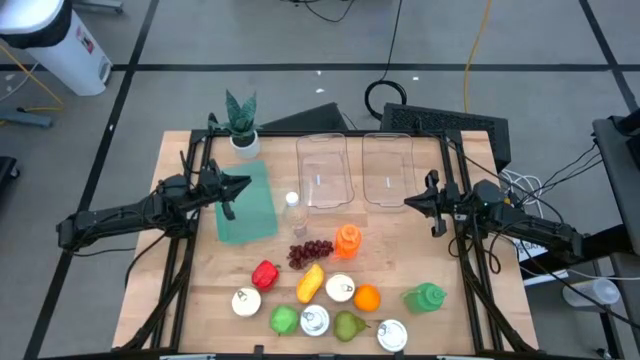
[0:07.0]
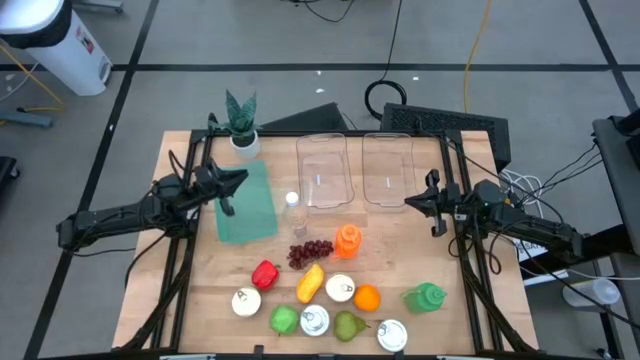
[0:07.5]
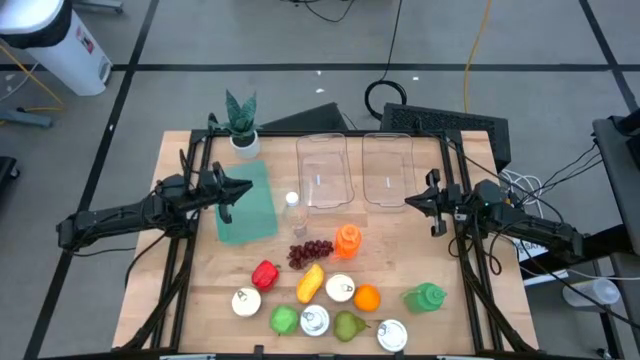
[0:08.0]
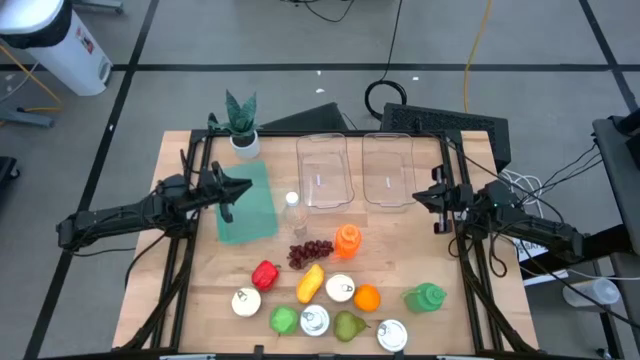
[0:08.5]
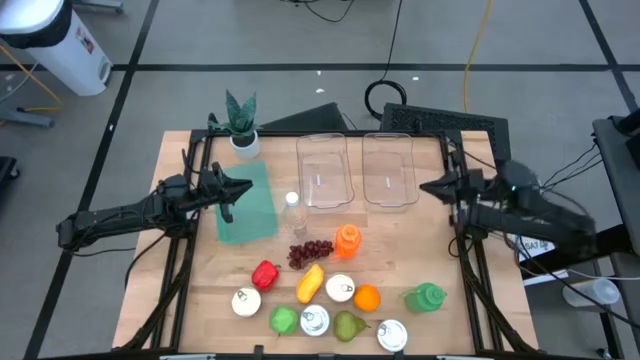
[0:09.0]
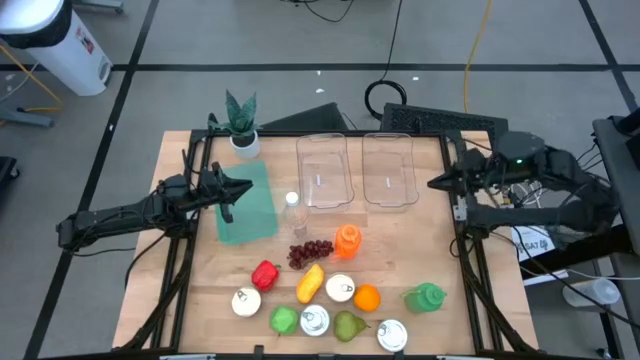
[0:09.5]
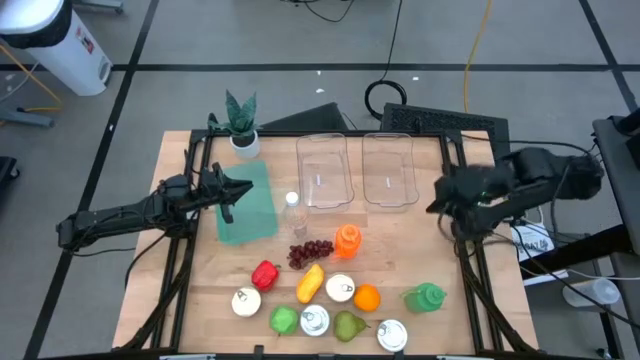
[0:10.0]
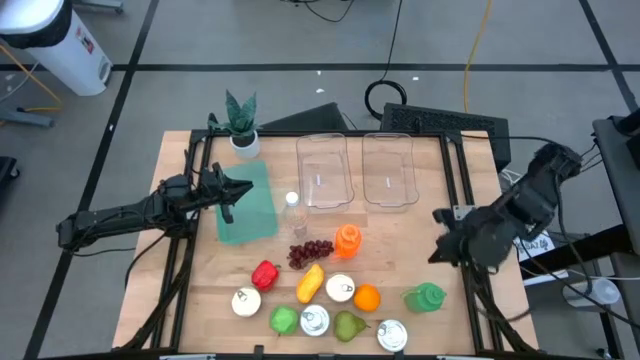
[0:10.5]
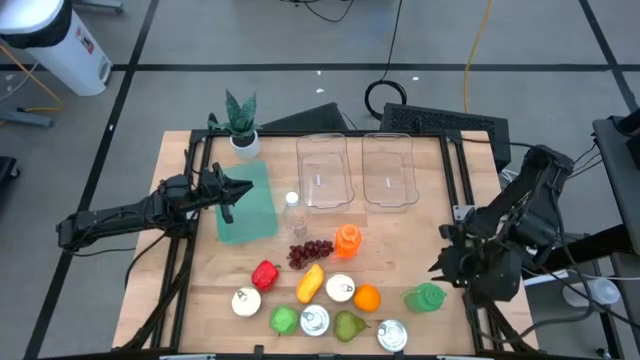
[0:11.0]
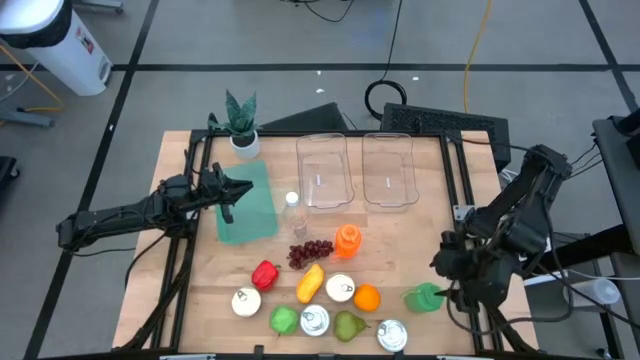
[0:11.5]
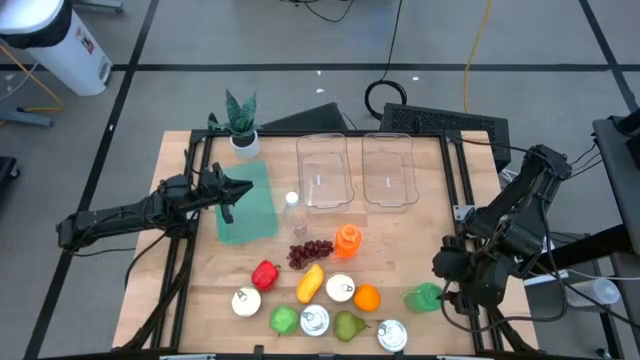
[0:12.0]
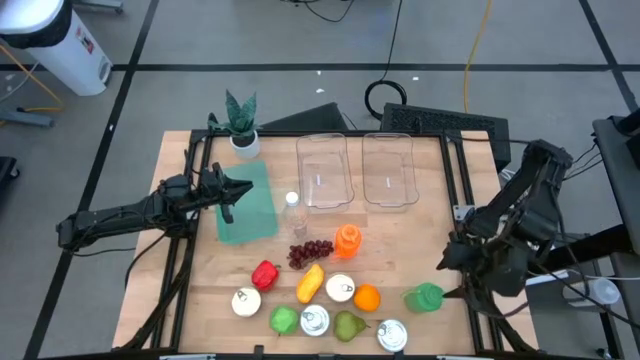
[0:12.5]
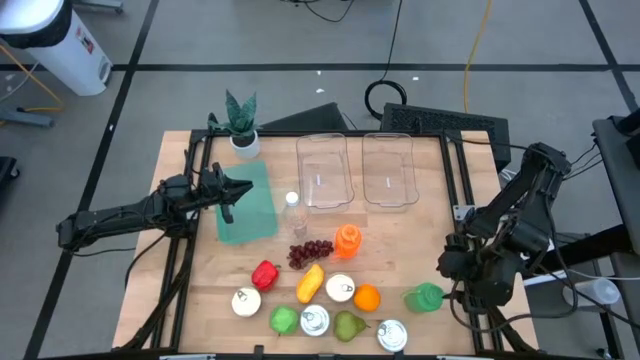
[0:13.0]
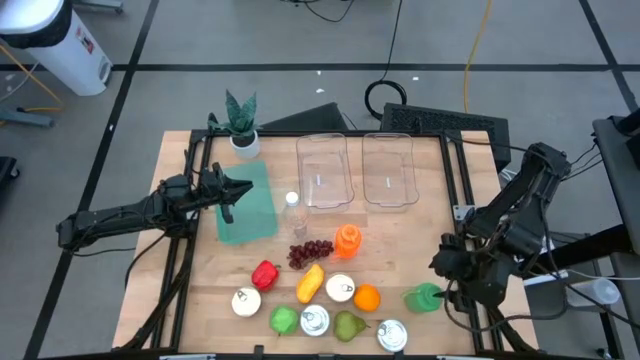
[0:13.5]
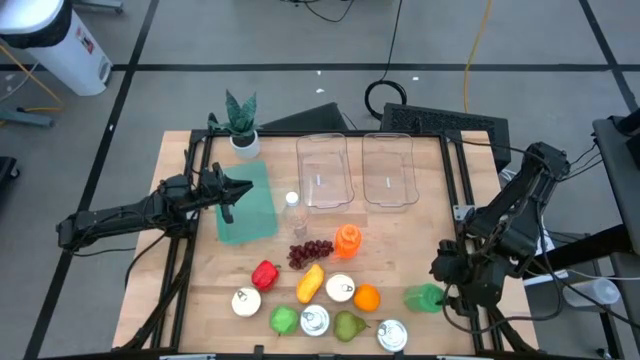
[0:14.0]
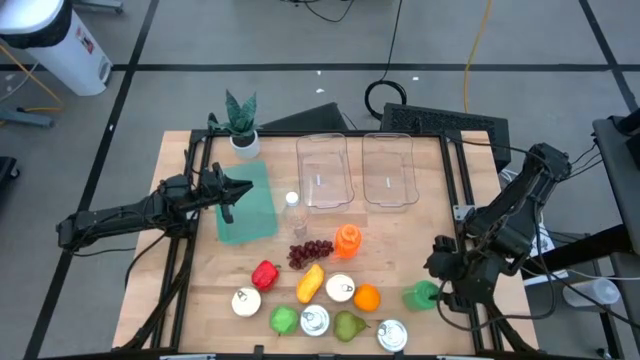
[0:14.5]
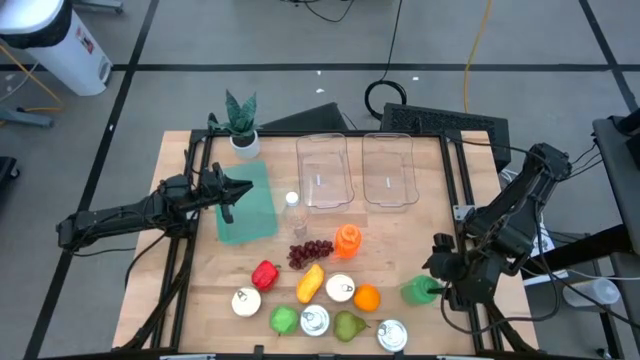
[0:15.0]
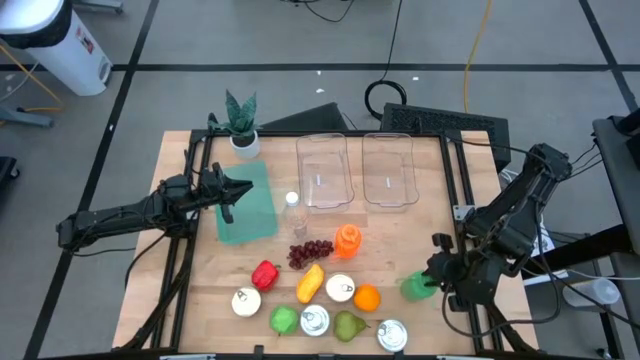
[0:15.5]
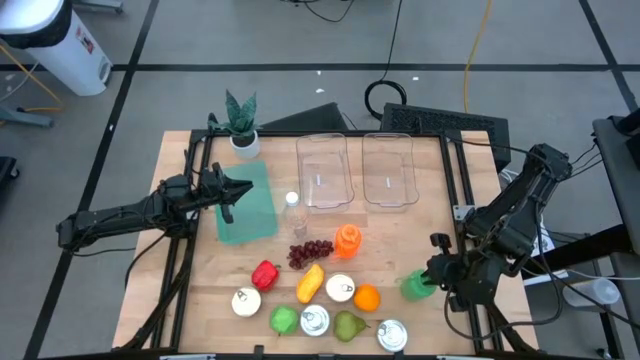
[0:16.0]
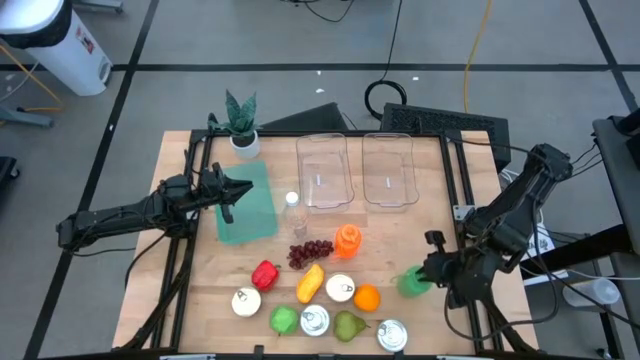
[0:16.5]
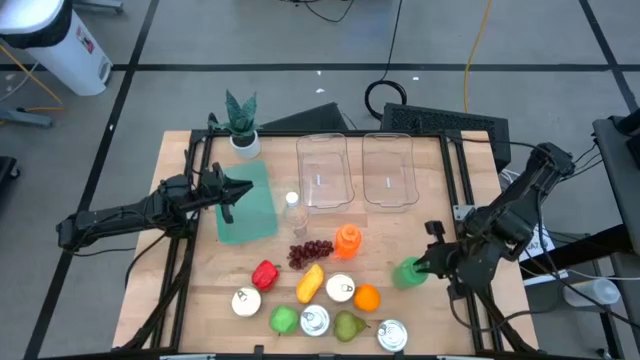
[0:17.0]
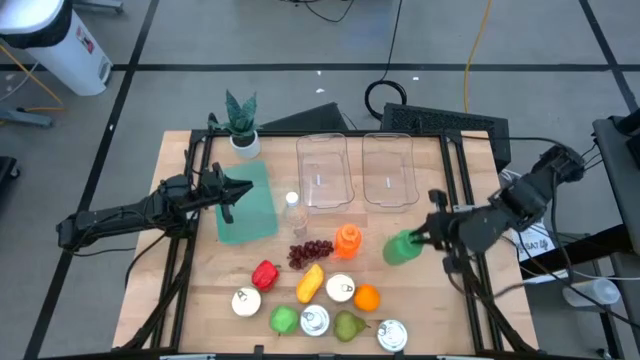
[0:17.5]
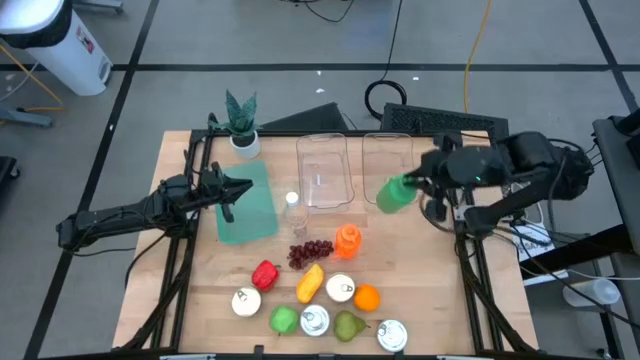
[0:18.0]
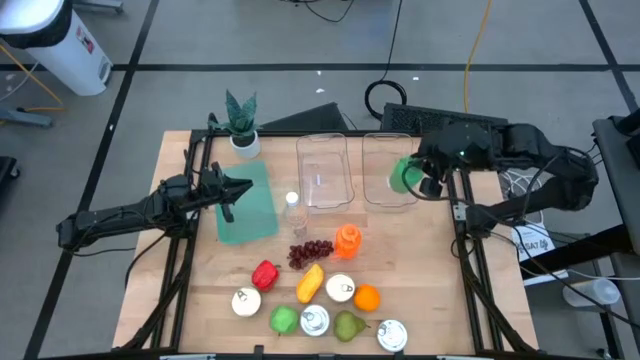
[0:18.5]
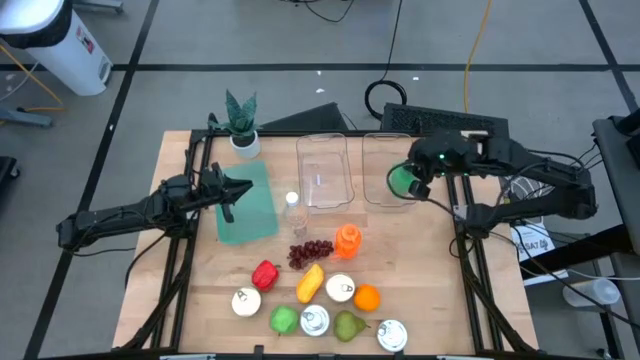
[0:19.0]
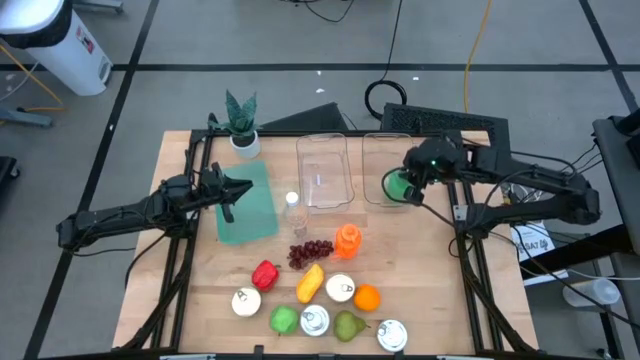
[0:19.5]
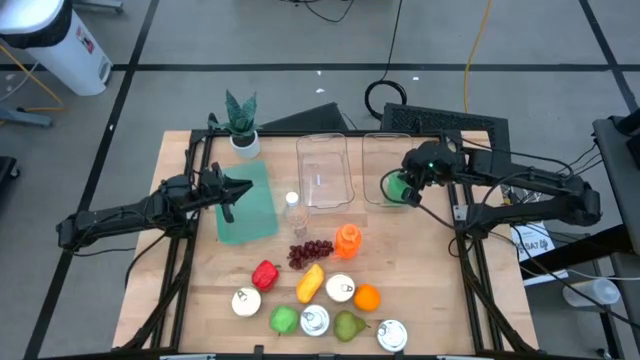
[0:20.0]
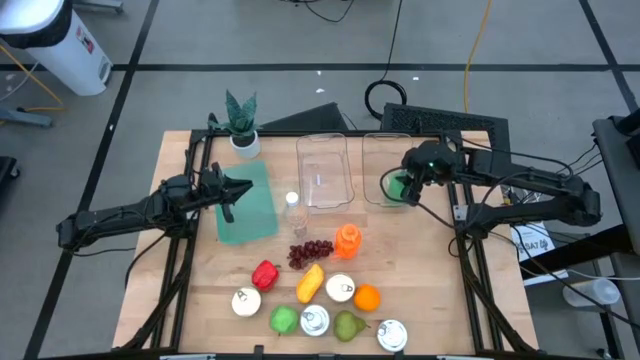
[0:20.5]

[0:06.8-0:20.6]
Task: Pick & Place Food Item
Put the green water bottle into the right transparent bin

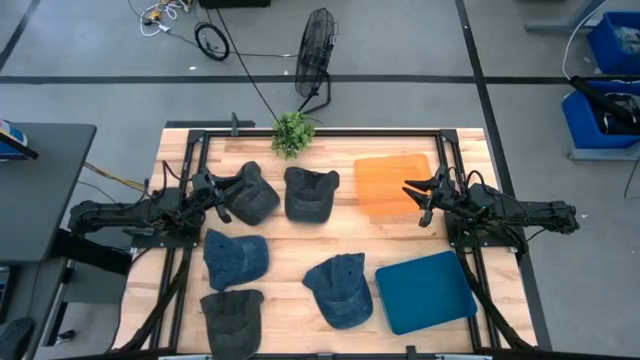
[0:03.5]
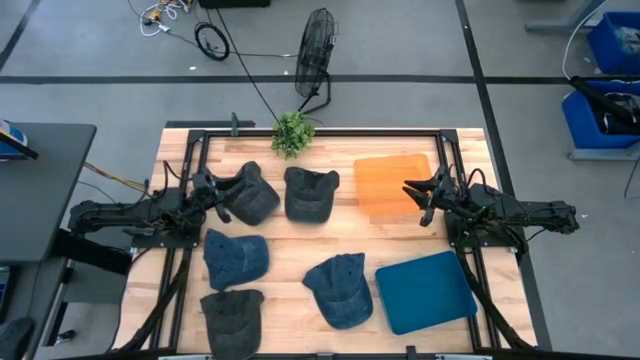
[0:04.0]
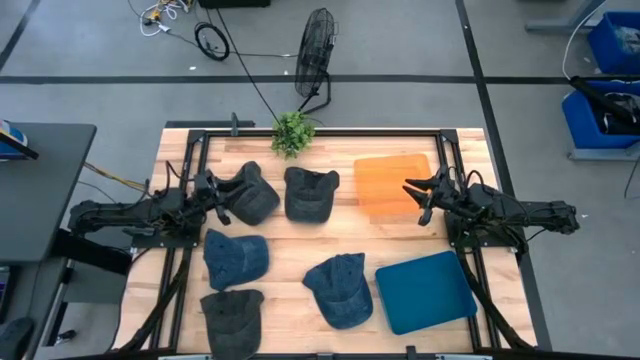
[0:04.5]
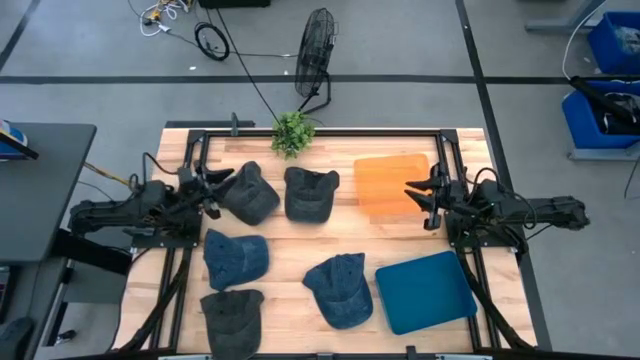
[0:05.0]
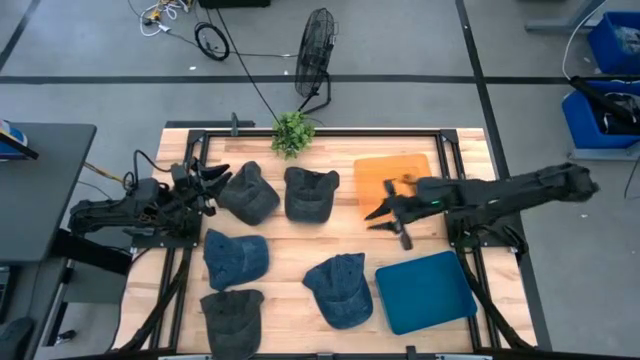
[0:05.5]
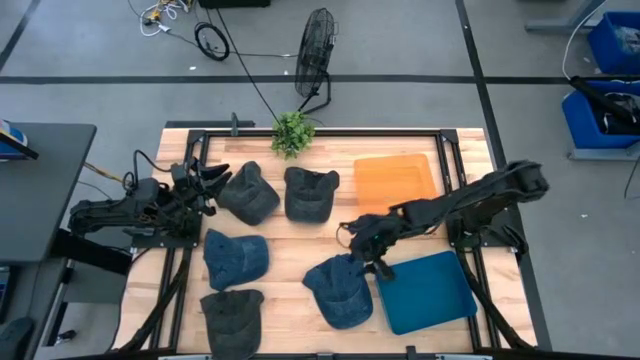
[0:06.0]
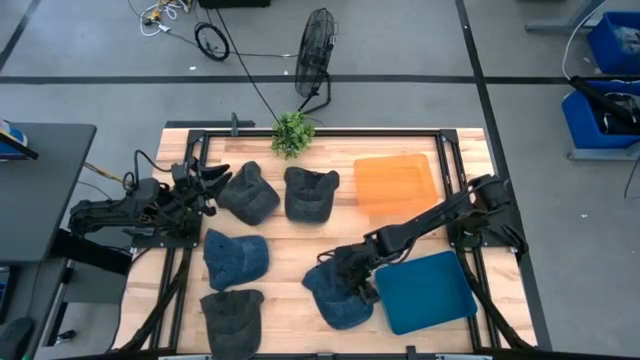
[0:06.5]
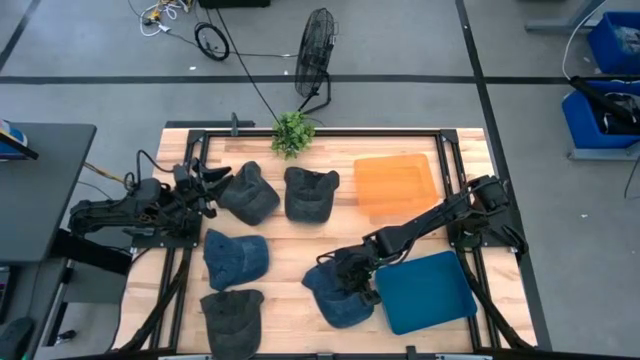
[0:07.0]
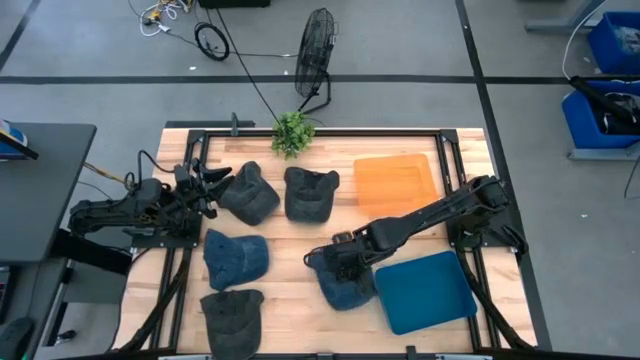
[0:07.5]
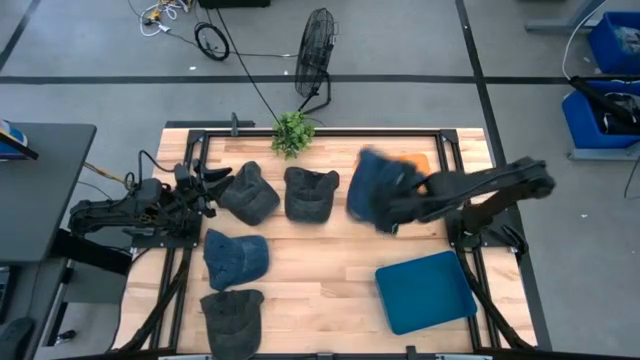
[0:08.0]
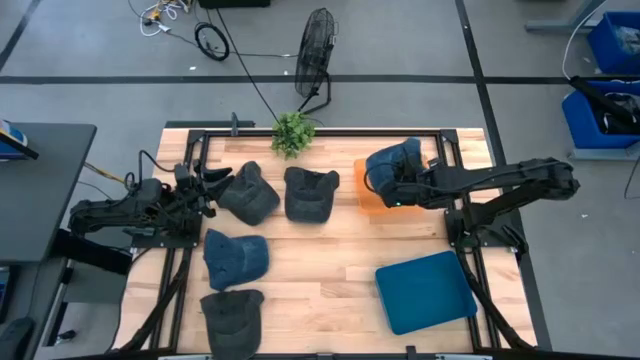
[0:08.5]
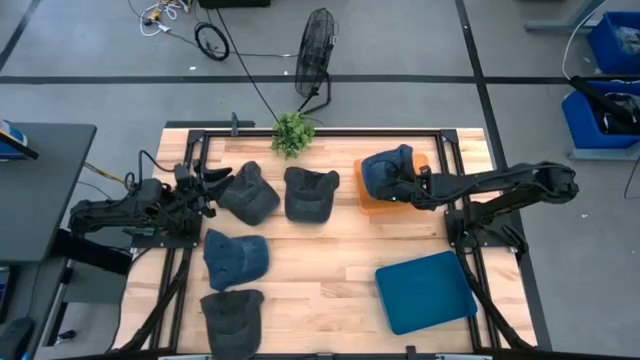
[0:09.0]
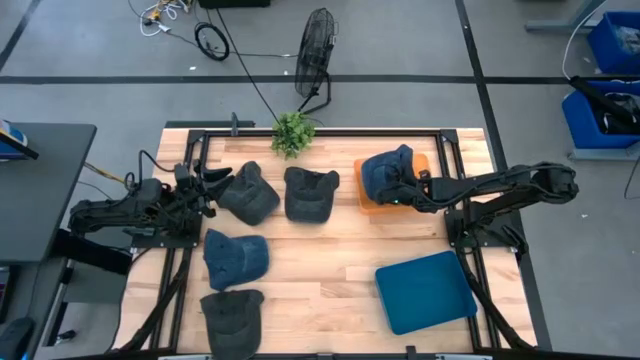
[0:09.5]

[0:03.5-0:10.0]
Task: Pick & Place hat
Put the right blue cap into the orange bin
